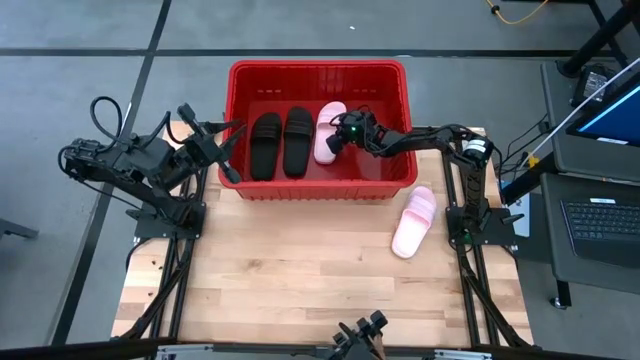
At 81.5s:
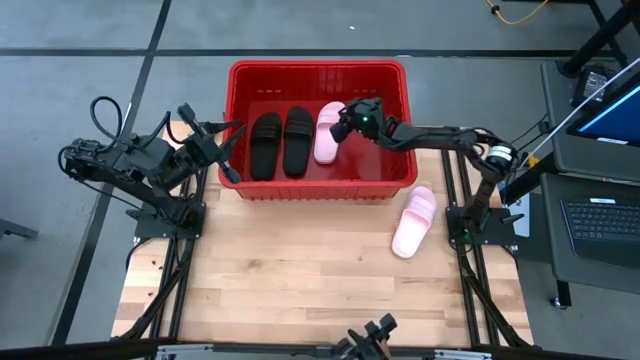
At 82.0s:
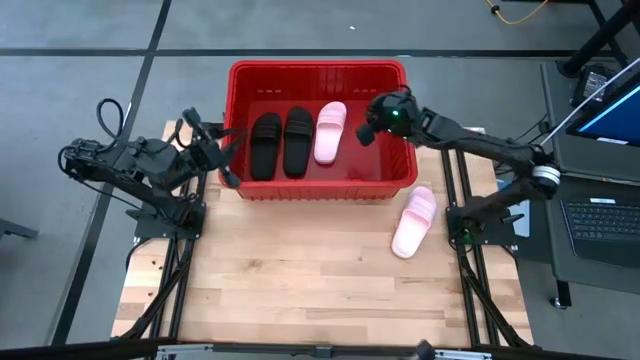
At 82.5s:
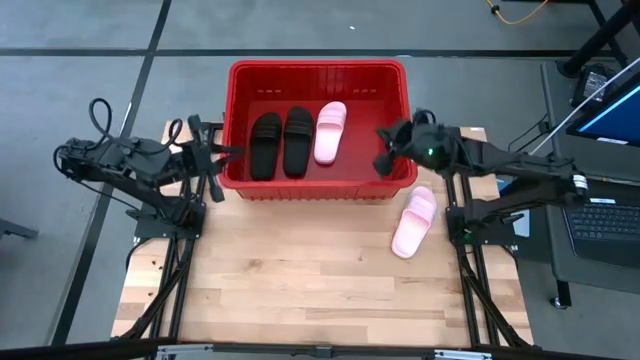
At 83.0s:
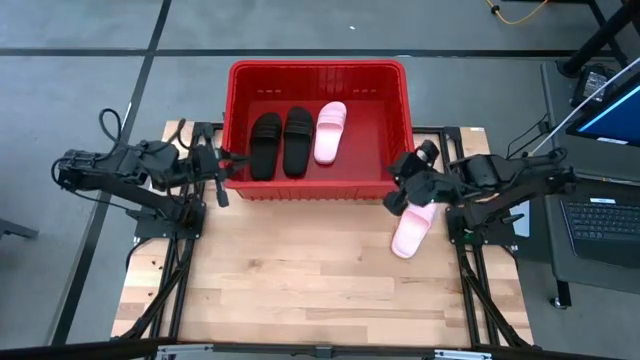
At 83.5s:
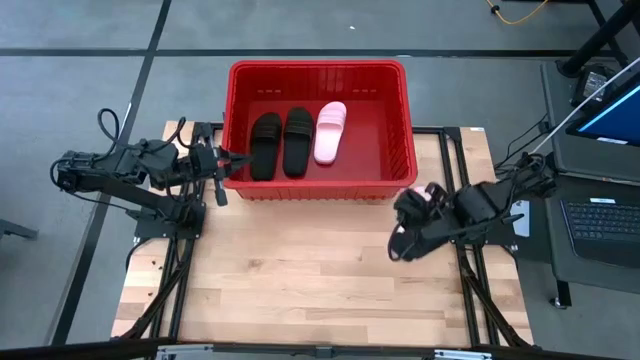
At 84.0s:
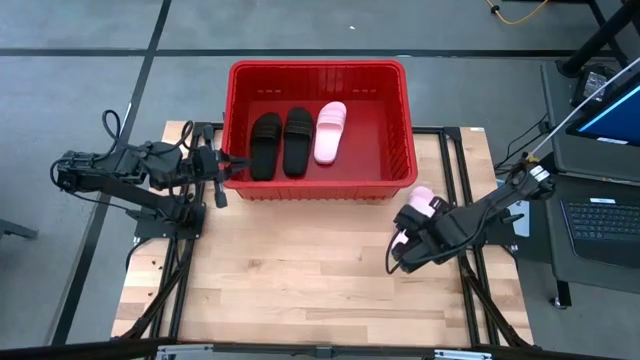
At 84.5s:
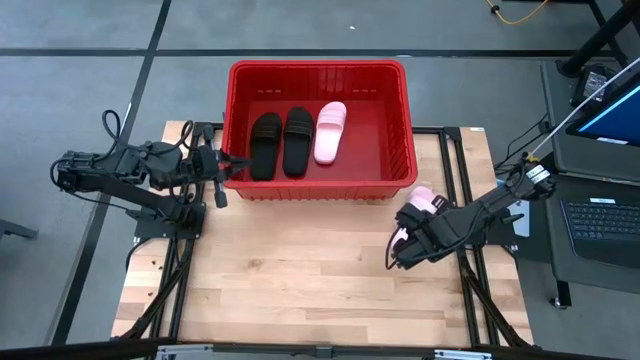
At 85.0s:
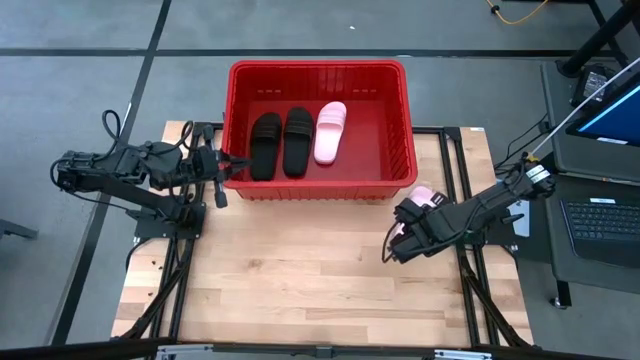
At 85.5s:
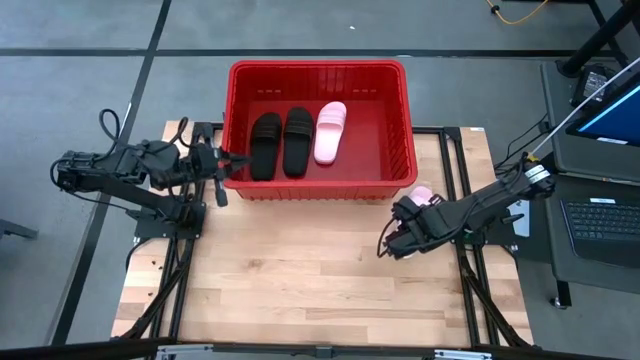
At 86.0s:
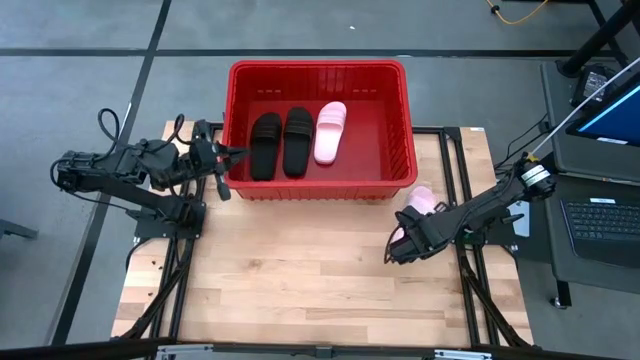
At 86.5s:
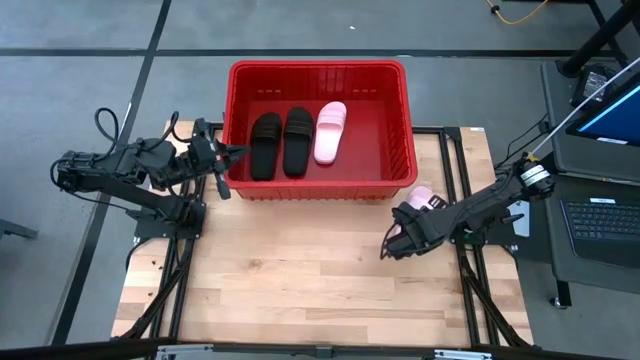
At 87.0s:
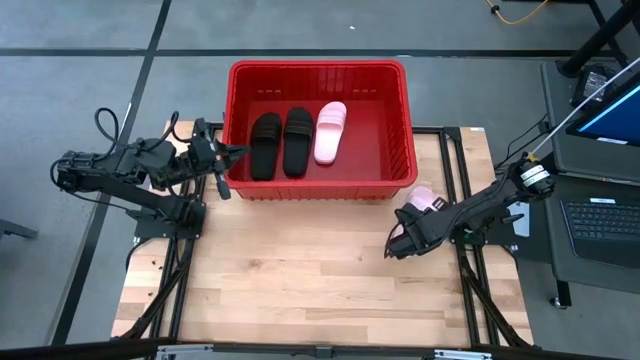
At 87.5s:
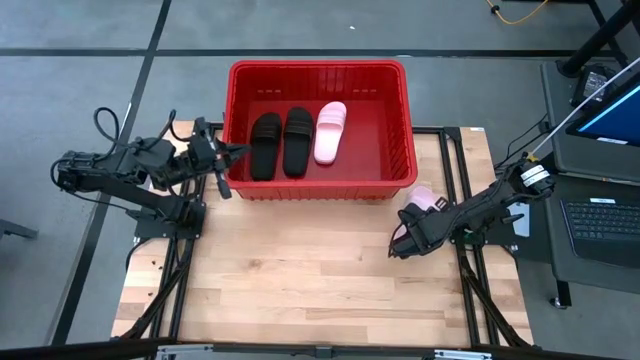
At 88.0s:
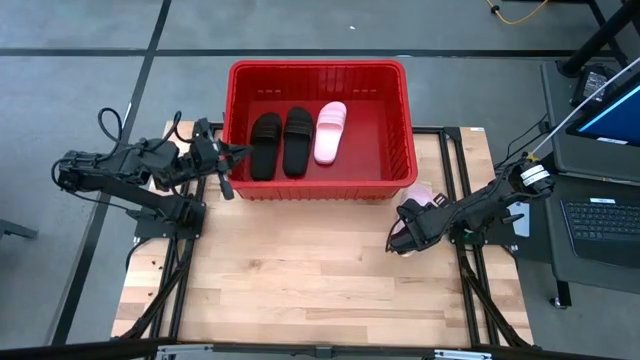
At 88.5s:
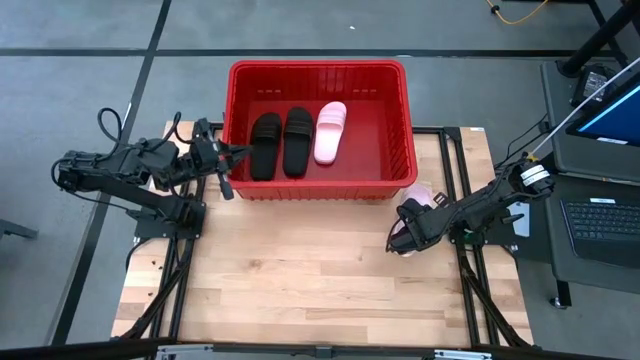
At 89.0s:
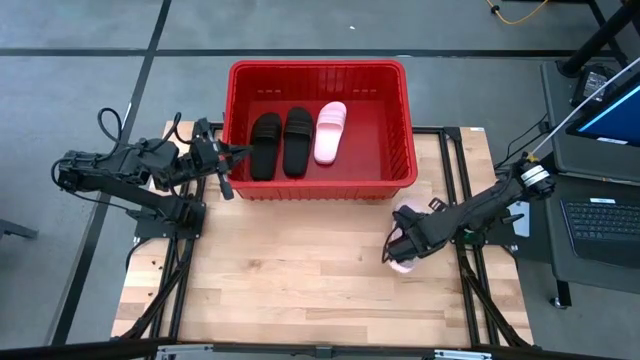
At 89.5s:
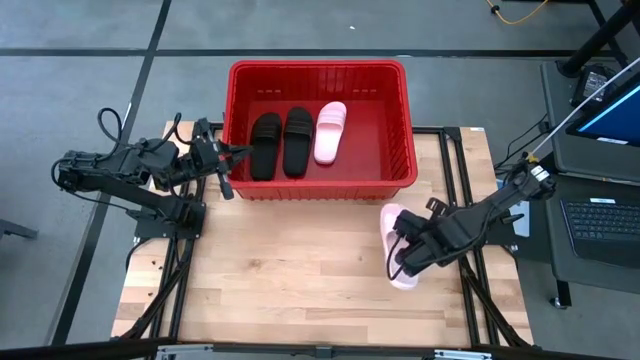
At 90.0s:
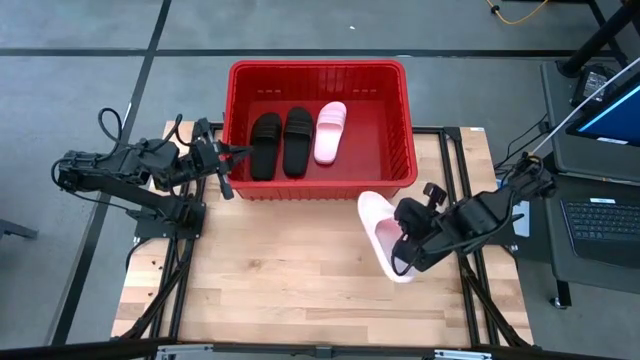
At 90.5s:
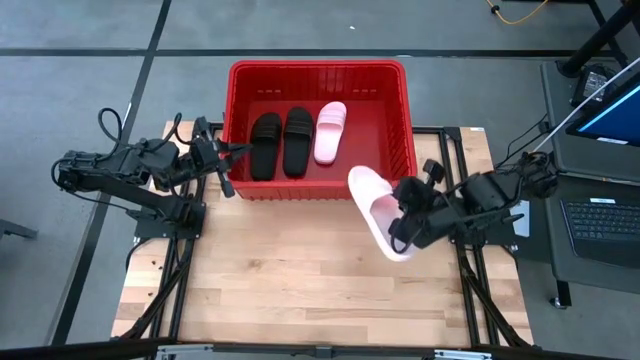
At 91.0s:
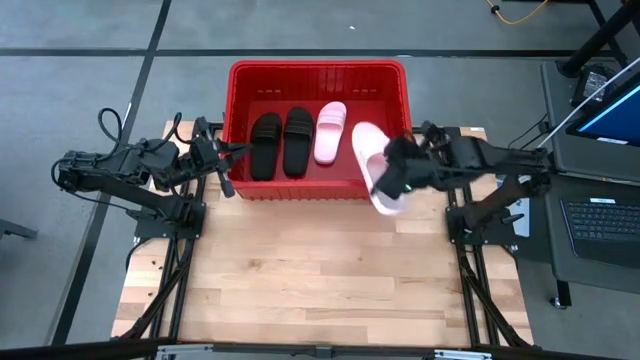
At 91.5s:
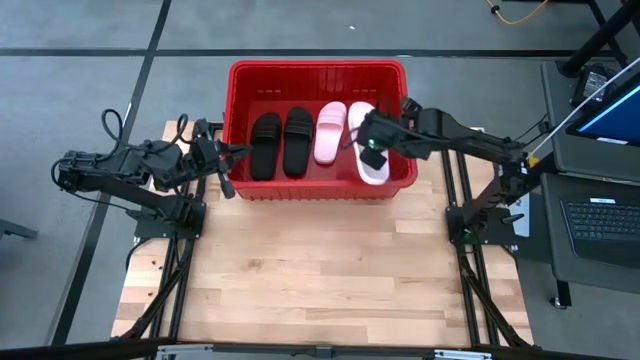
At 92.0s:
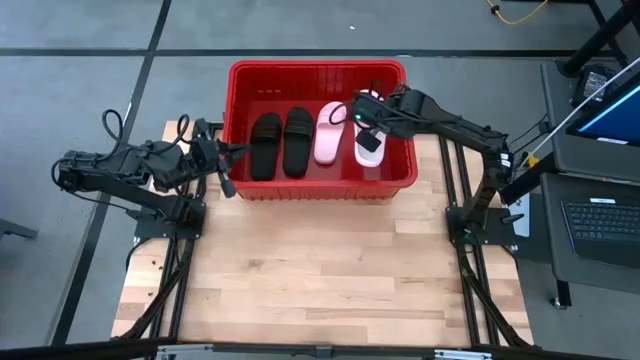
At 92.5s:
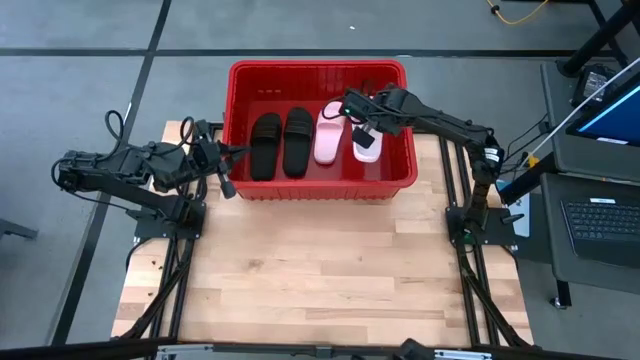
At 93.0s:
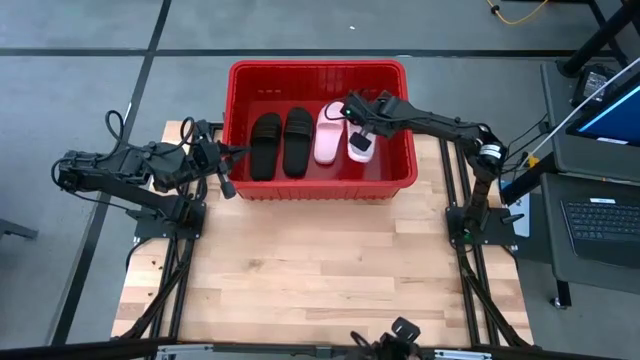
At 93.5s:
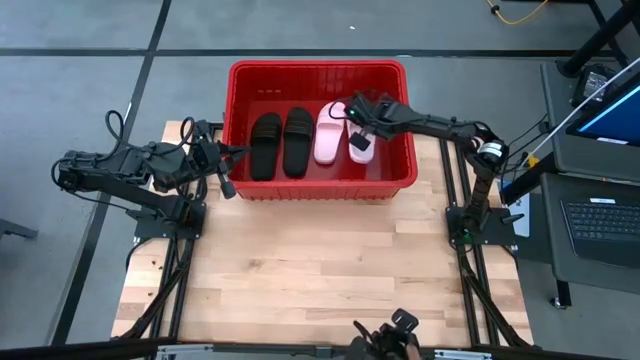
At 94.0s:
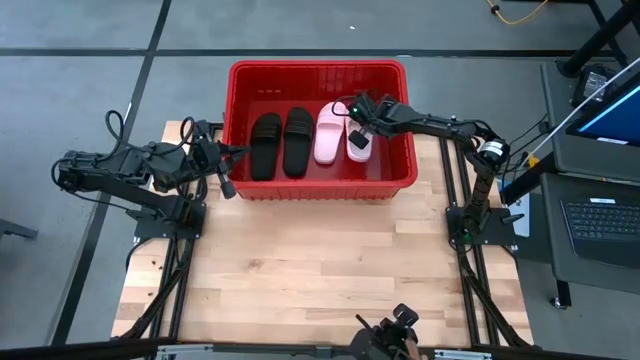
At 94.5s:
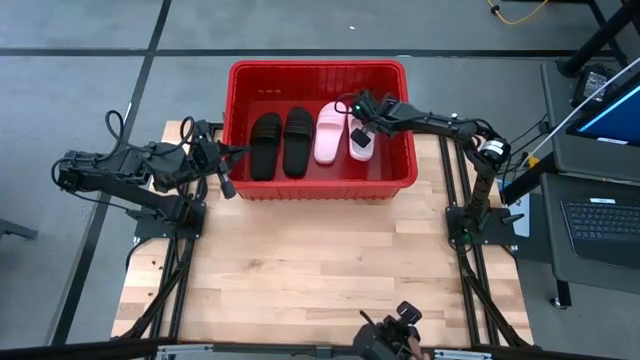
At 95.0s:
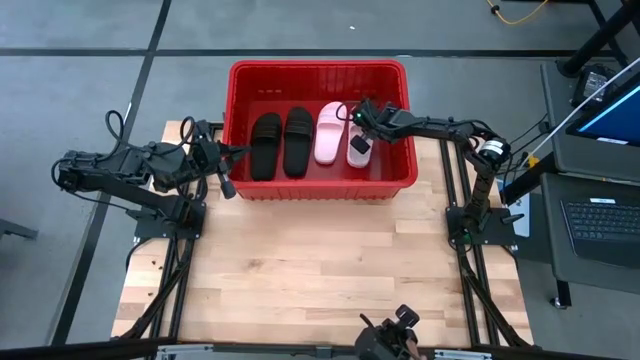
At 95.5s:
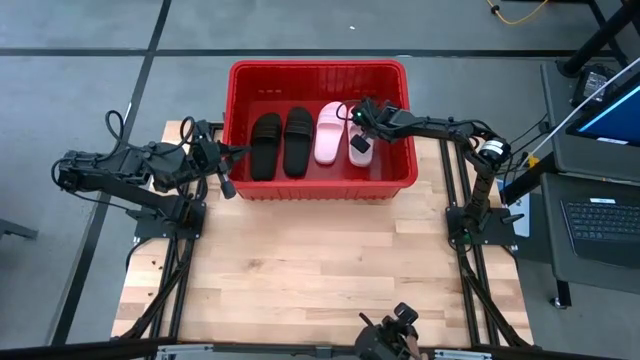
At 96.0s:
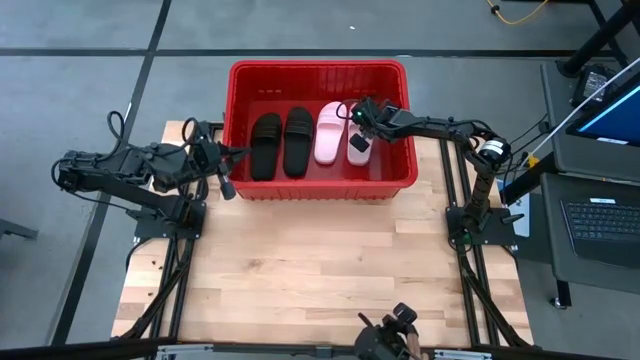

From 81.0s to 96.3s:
Task: Pick and place slides into bin
Put the pink slide into the red container

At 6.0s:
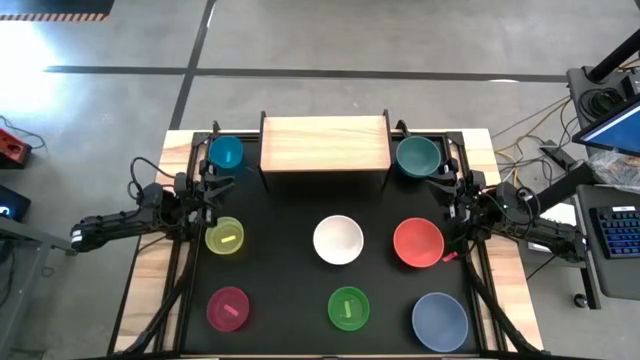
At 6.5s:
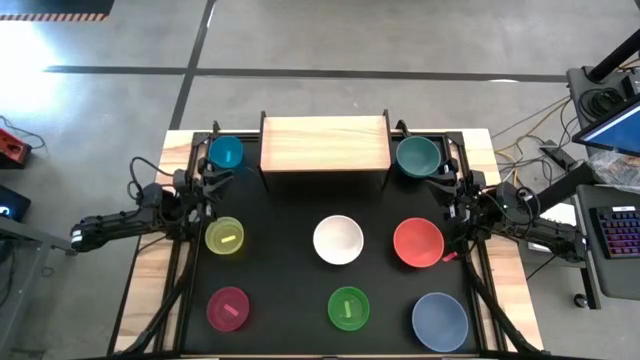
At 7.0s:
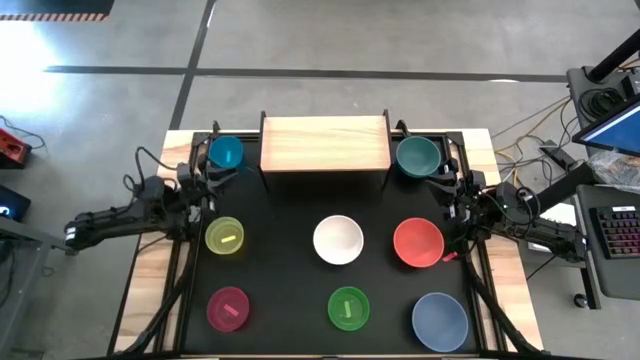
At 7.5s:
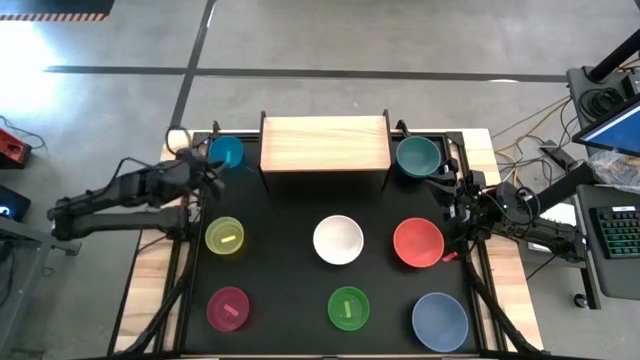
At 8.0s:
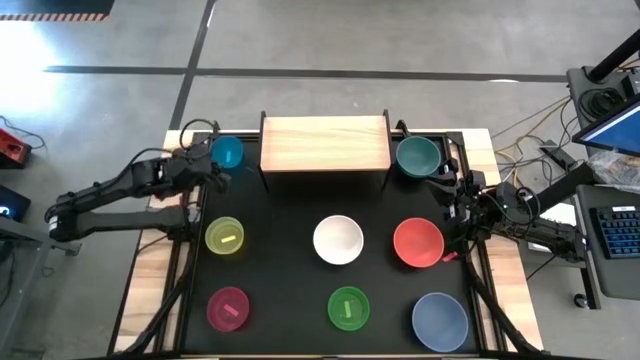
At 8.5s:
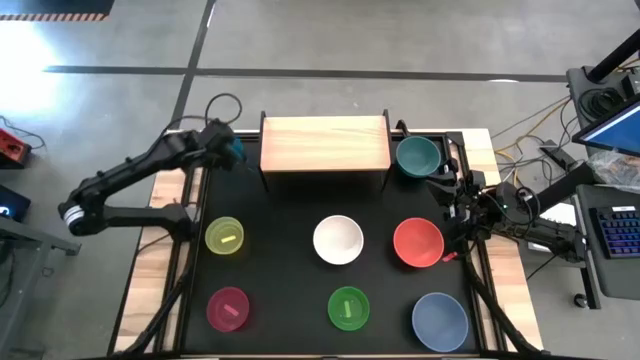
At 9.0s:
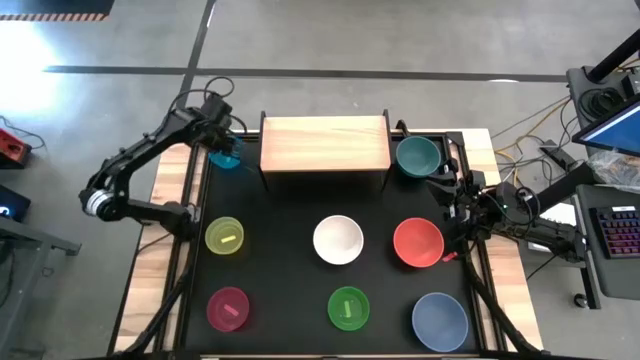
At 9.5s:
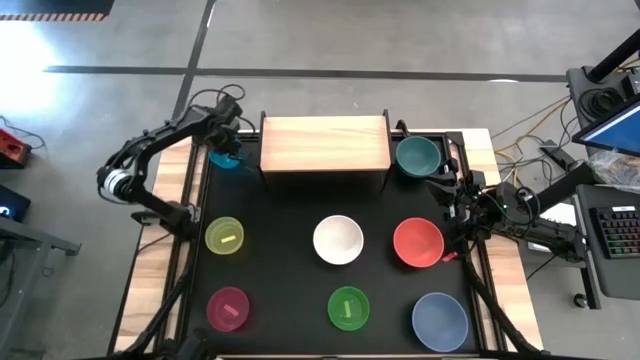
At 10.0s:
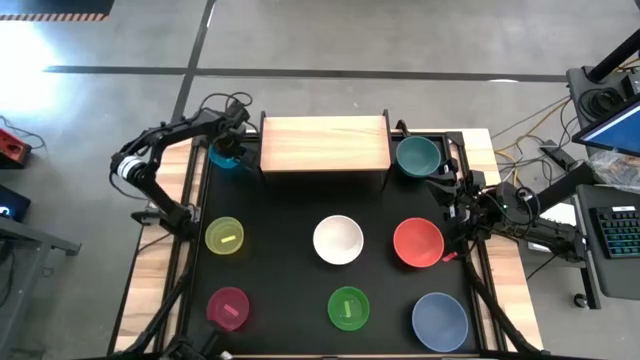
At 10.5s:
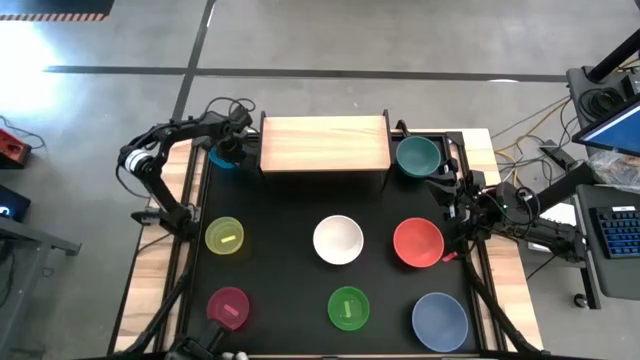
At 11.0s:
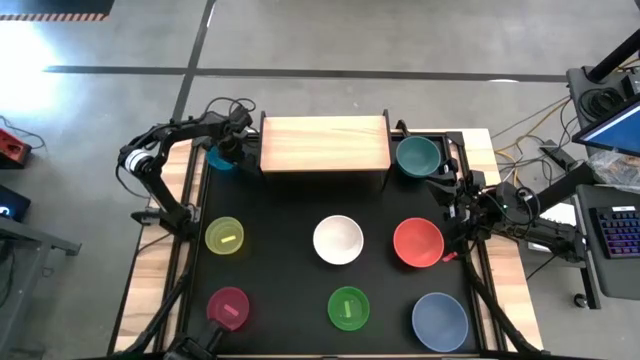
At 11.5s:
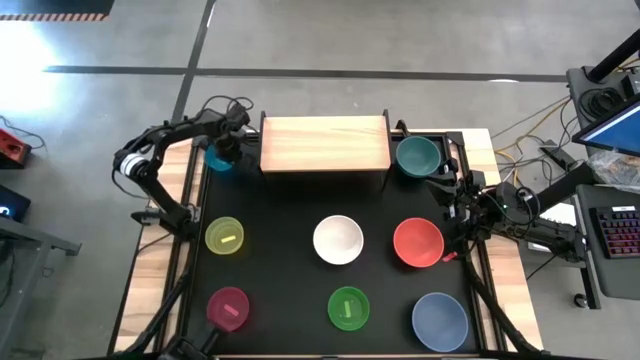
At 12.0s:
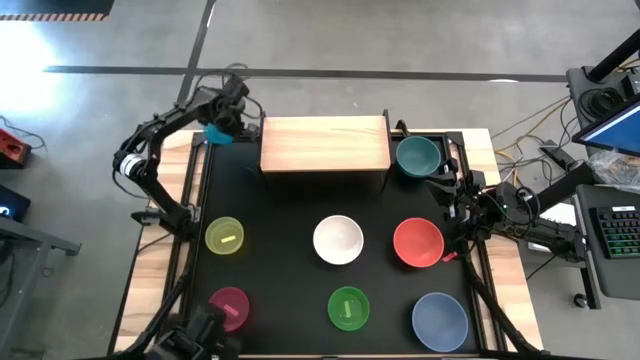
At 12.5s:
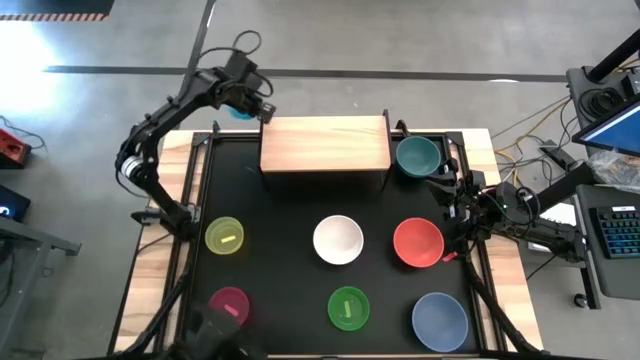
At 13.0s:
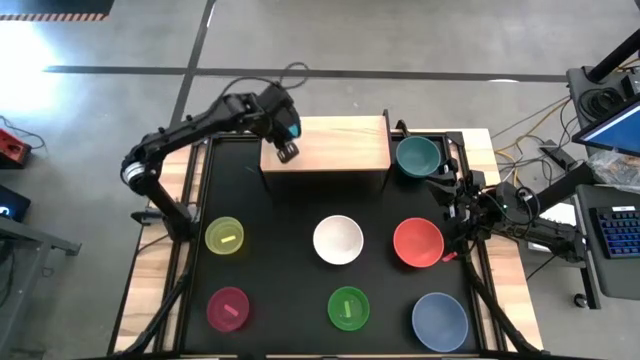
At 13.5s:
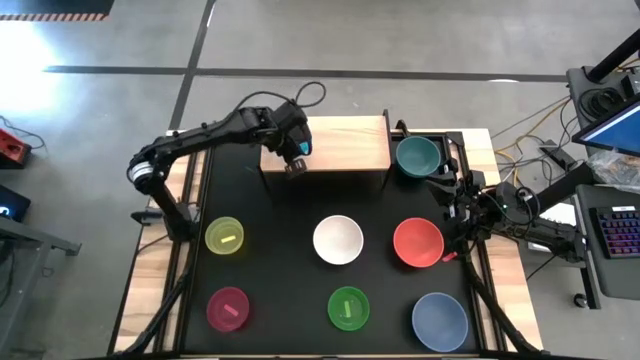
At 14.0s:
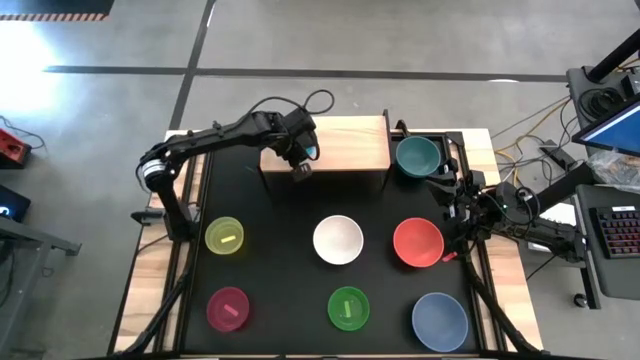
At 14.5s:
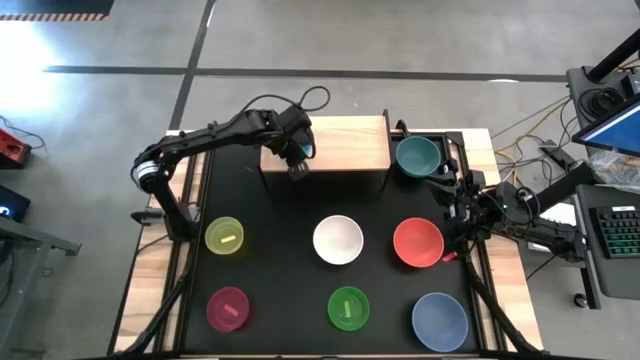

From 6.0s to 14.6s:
Task: Place and stack bowls onto a shelf
Put the small blue bowl on the shelf
